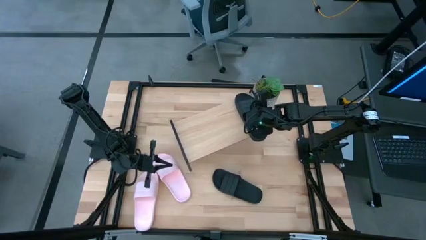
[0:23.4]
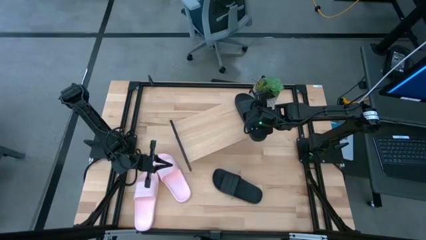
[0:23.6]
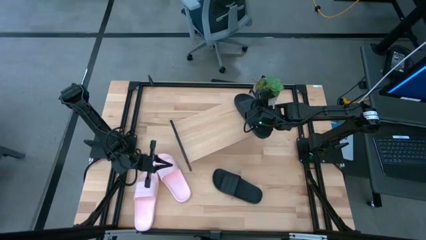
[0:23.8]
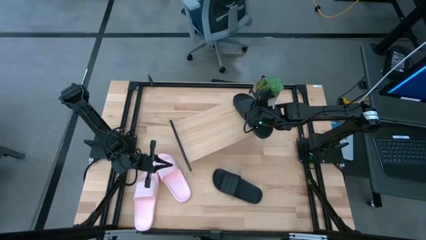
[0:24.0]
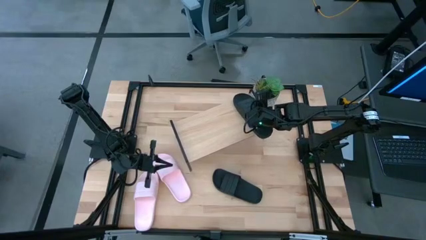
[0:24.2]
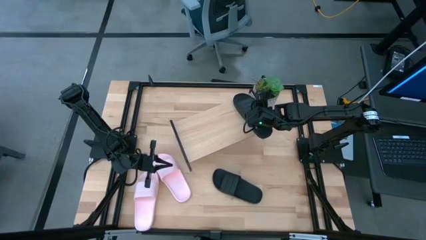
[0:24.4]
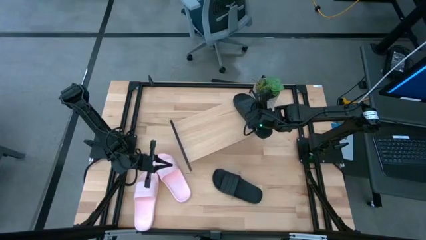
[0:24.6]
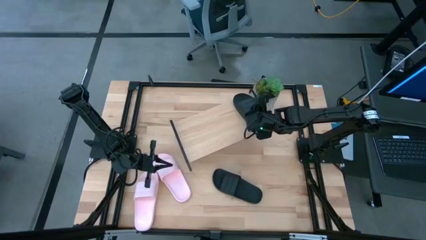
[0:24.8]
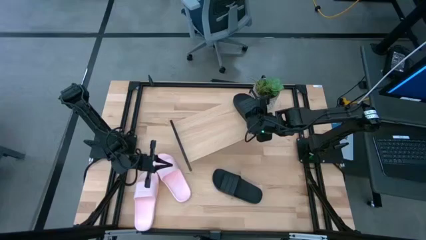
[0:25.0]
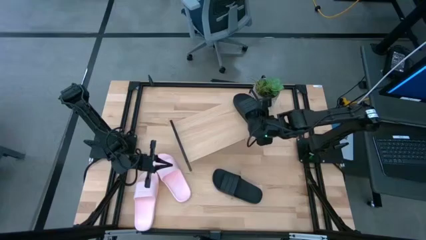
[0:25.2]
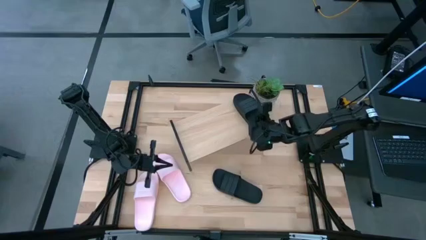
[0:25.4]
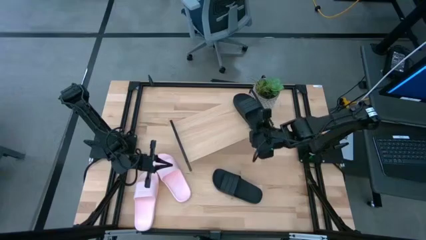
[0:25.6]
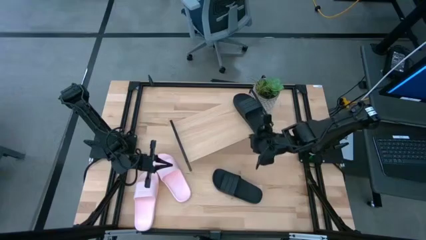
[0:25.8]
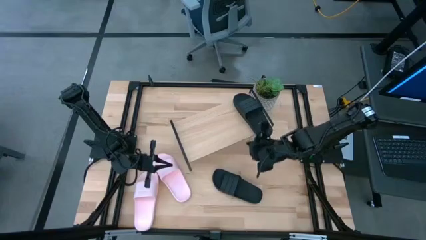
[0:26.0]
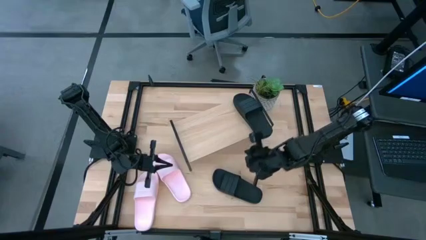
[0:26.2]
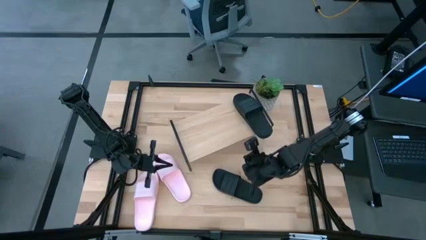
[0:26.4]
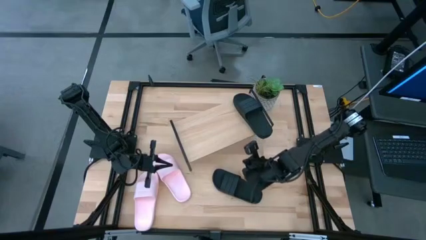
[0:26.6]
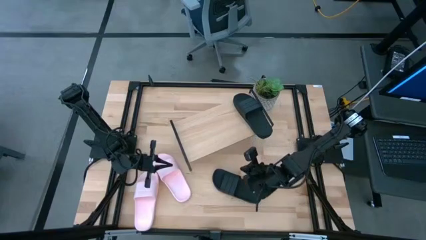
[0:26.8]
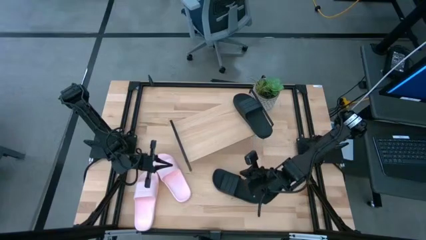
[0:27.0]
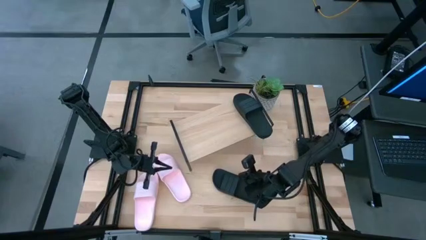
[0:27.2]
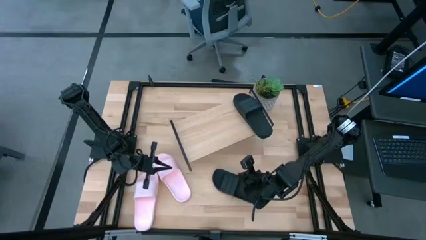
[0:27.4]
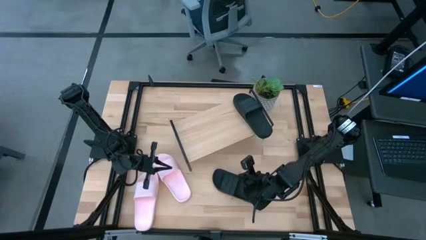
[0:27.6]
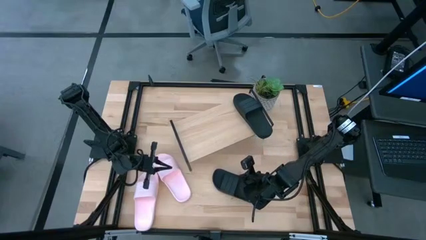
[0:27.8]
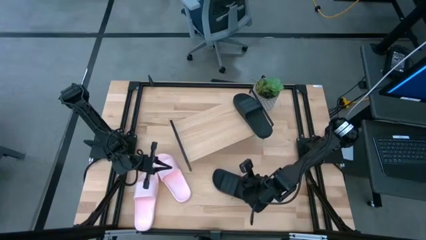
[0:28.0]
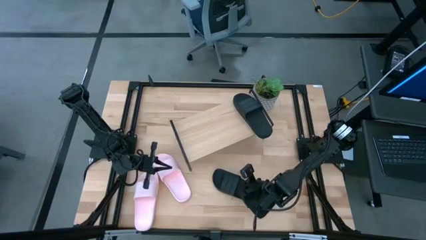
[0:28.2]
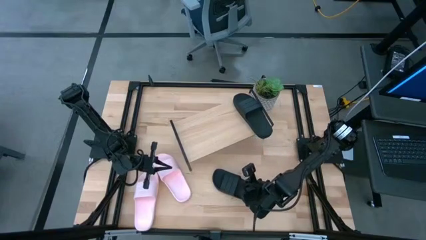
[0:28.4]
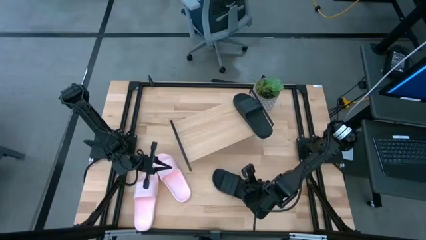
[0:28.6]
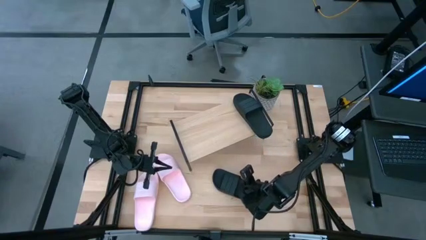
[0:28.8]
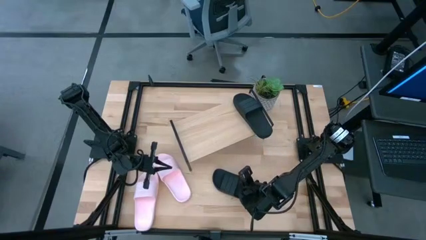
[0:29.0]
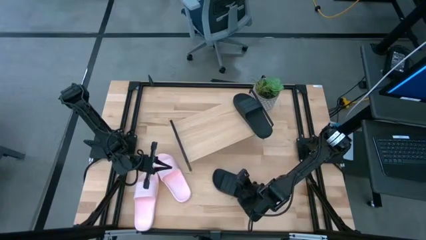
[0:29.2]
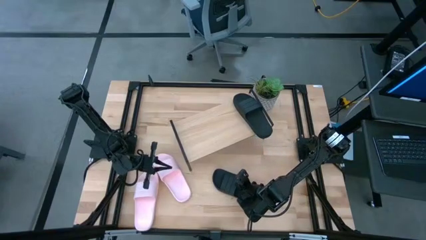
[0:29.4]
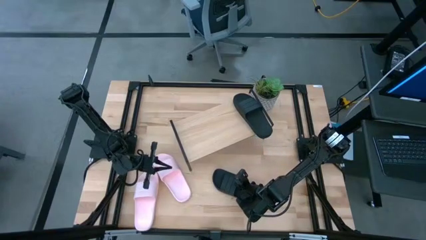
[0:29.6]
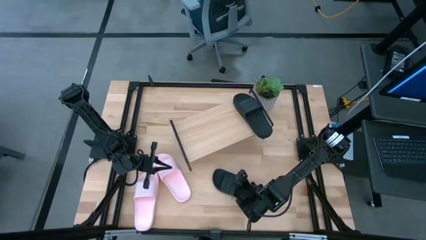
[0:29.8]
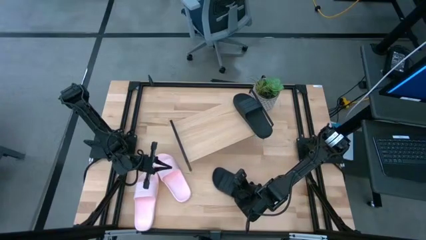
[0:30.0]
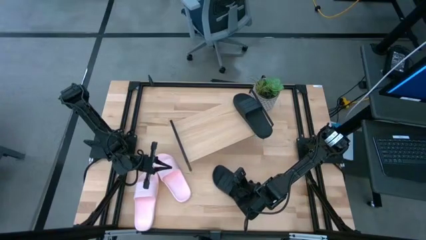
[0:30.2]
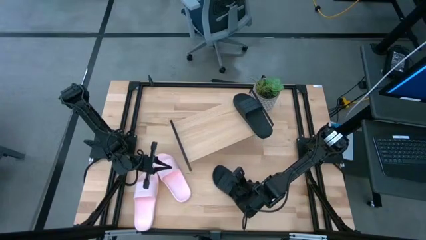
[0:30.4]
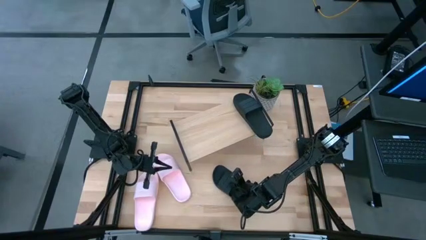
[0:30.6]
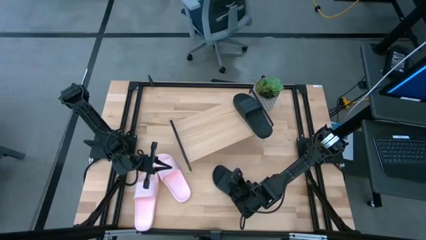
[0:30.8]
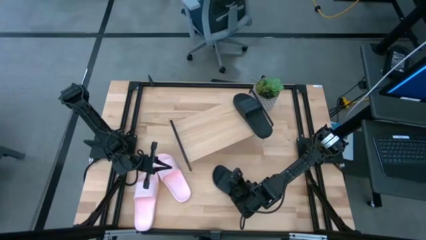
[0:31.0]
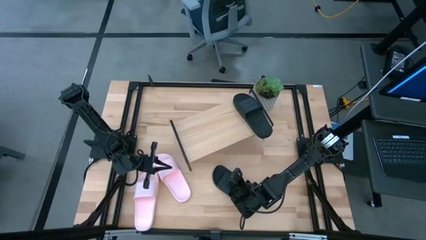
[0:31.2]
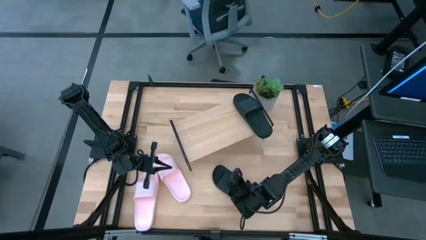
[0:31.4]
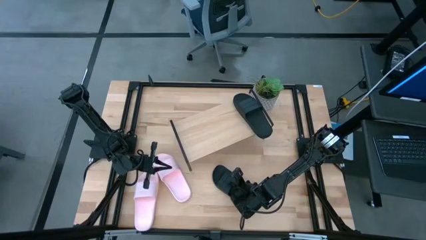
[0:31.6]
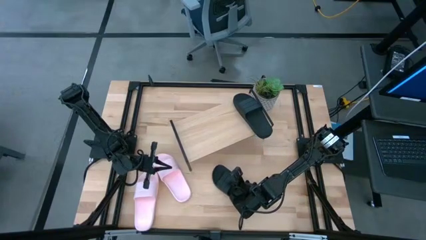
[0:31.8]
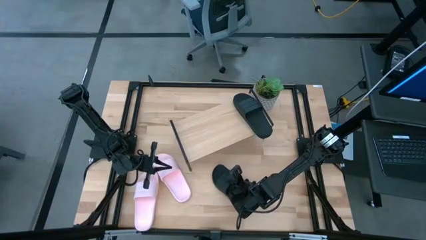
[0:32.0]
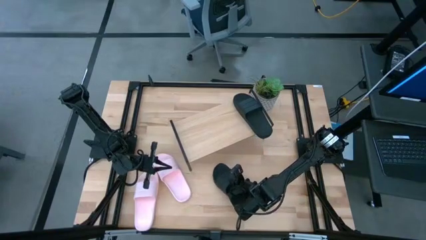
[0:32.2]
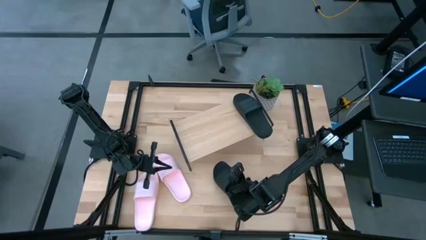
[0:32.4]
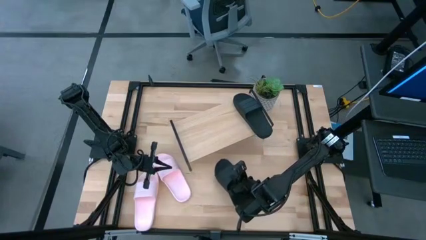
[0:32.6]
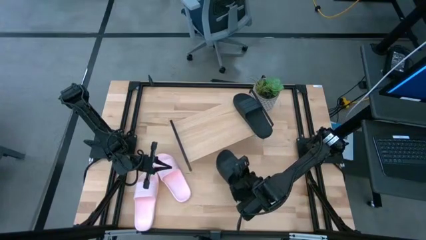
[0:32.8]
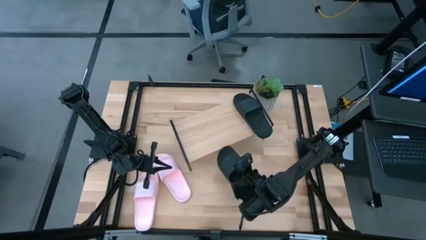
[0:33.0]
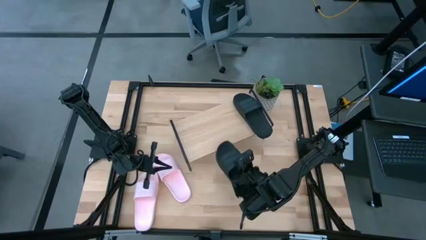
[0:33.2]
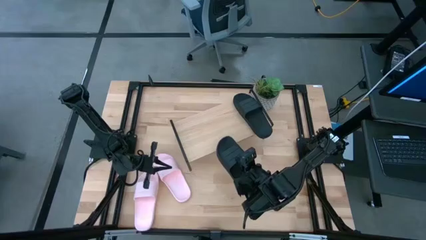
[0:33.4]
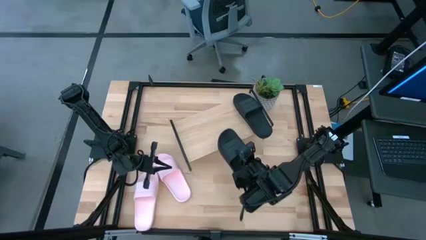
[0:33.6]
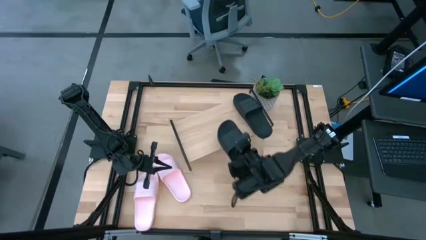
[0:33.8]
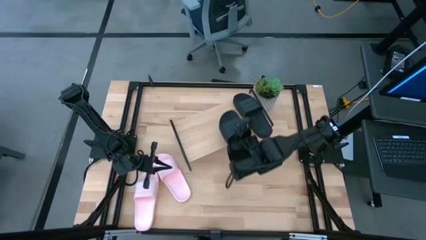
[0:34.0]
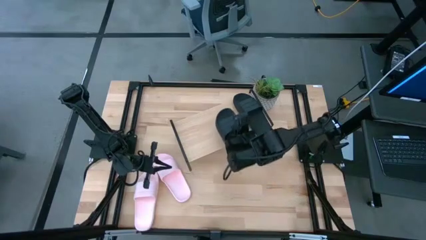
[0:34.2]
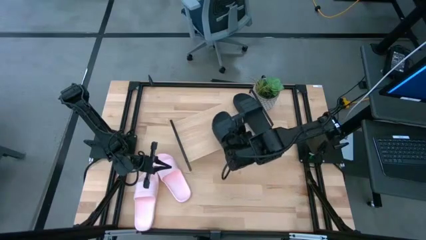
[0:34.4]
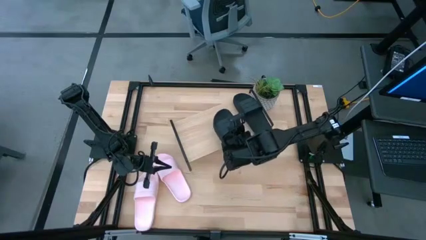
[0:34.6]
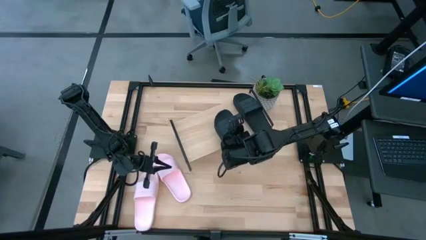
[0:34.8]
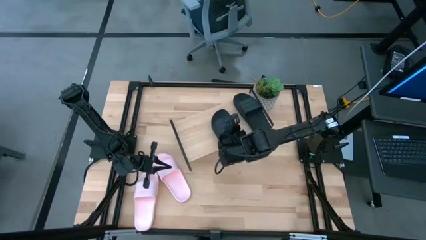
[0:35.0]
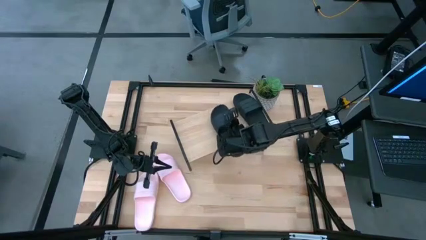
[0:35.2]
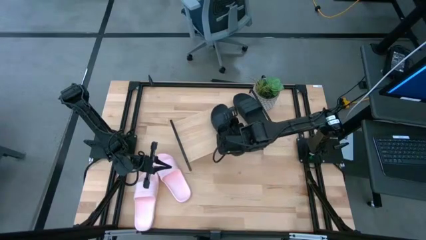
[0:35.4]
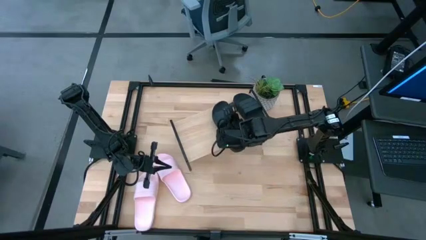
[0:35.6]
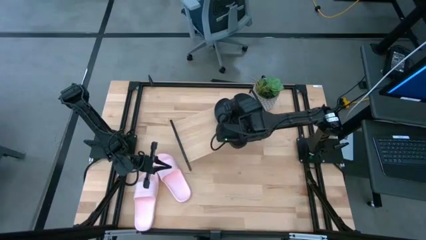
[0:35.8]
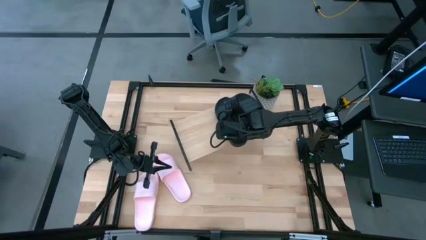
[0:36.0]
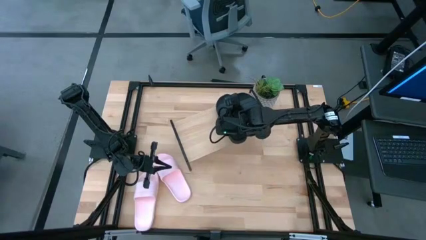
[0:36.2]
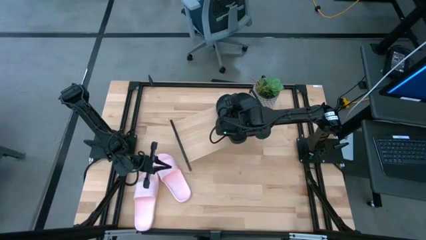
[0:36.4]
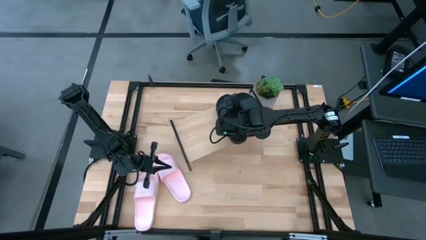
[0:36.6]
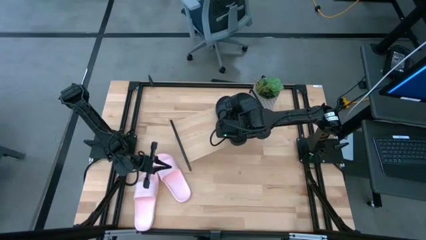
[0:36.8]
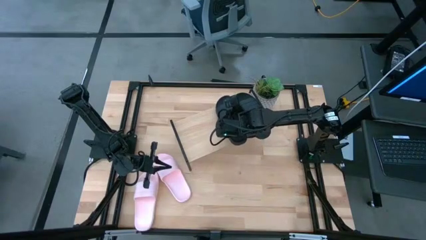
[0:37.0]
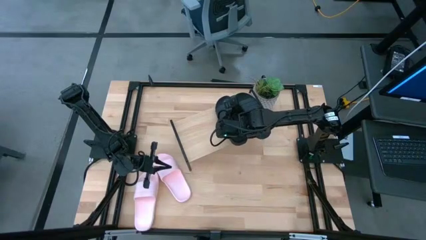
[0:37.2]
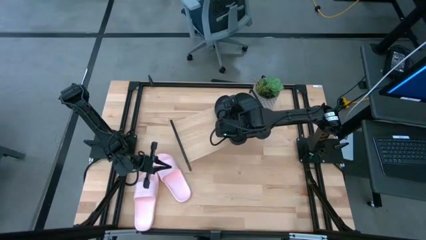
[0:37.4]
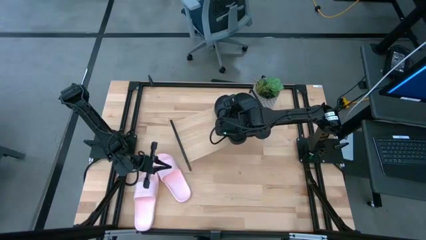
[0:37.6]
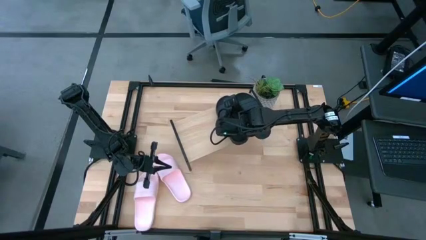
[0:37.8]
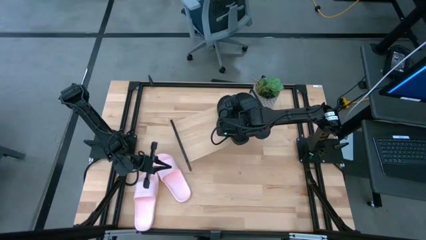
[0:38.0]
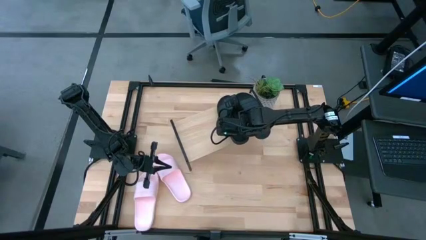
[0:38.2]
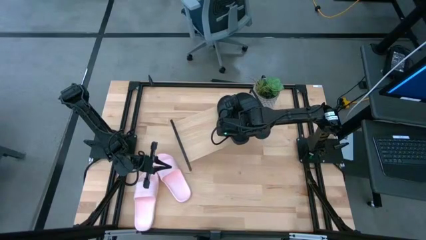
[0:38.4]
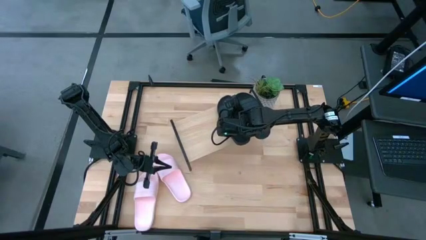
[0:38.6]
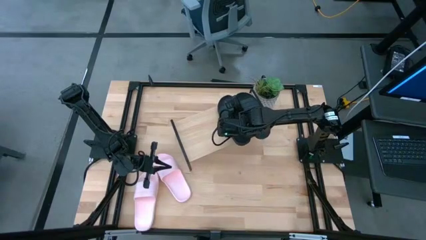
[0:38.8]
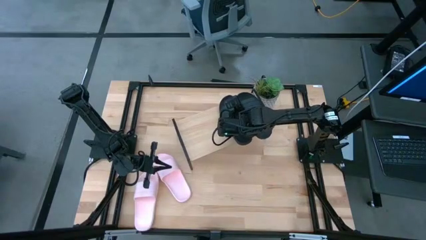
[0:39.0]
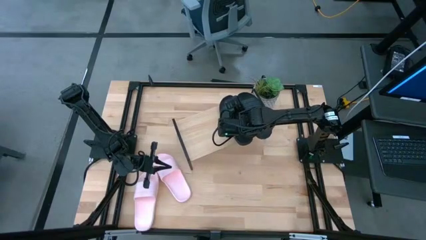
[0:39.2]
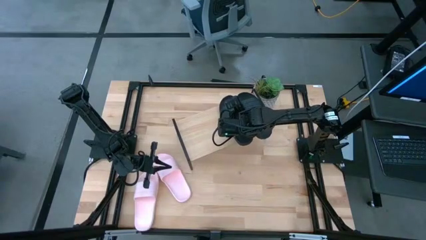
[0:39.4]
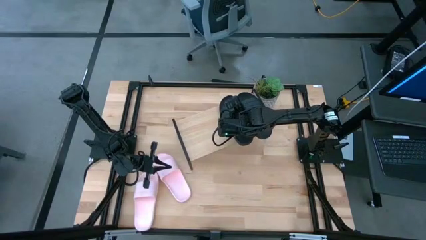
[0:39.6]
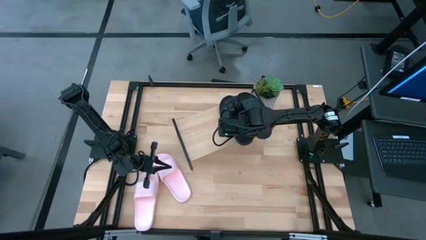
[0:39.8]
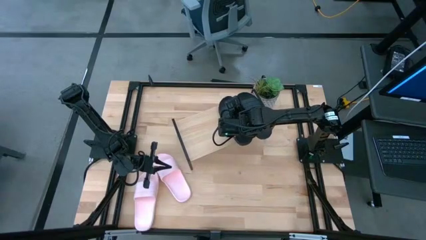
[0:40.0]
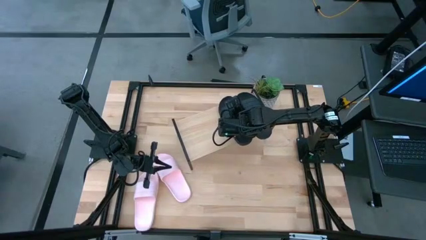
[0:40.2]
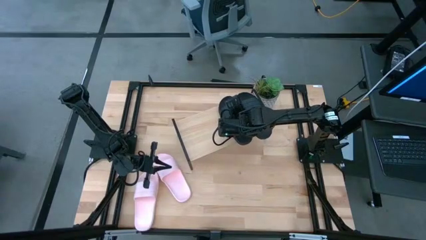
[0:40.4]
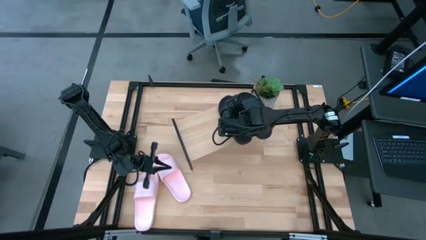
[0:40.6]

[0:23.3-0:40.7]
Task: Pick and place slides into the shelf
Put the left black slide on the shelf
